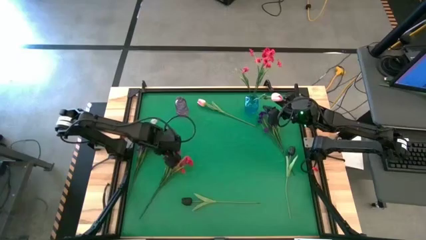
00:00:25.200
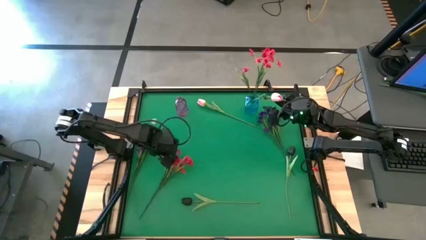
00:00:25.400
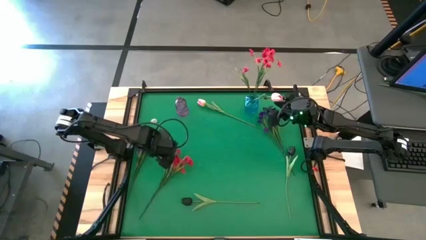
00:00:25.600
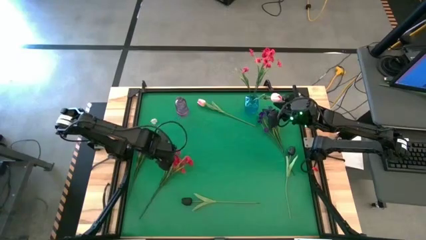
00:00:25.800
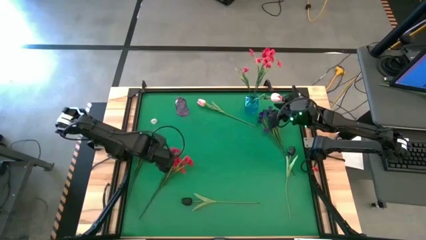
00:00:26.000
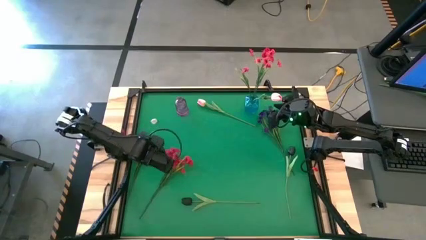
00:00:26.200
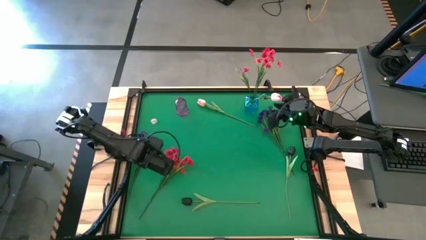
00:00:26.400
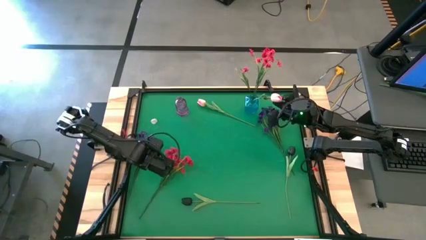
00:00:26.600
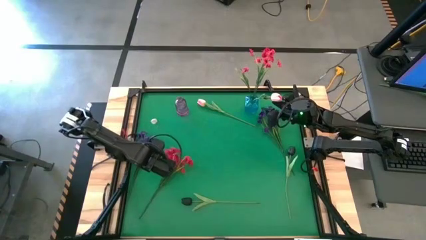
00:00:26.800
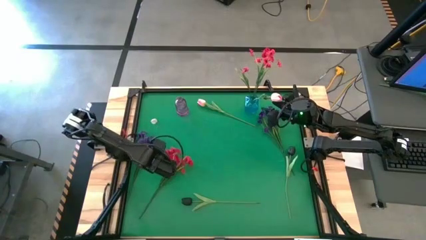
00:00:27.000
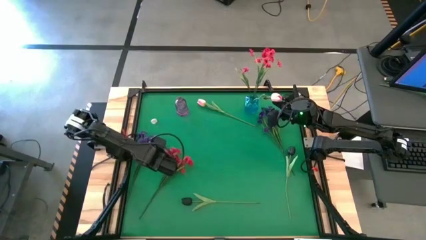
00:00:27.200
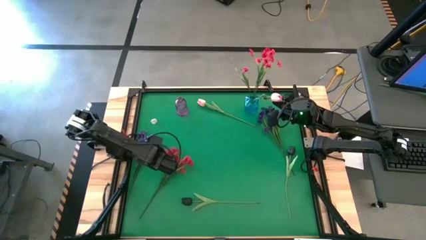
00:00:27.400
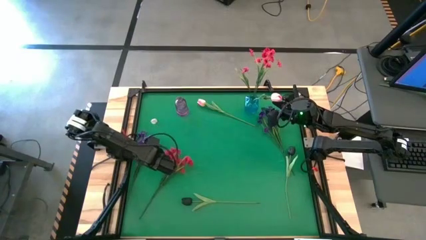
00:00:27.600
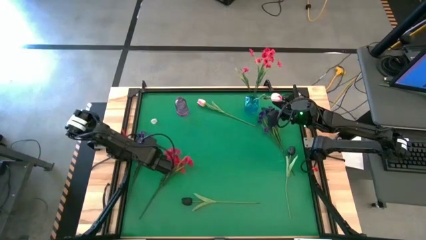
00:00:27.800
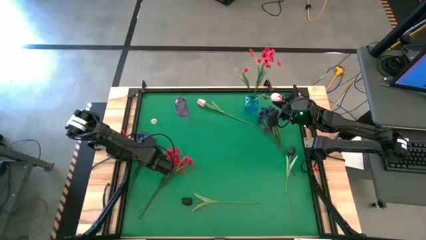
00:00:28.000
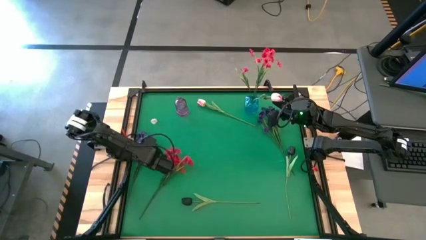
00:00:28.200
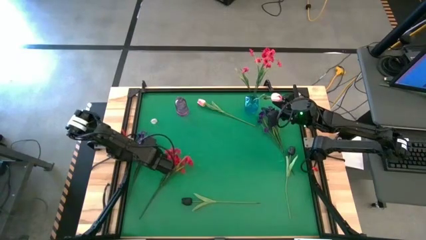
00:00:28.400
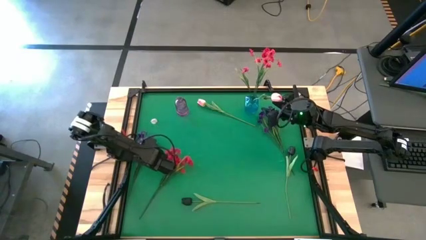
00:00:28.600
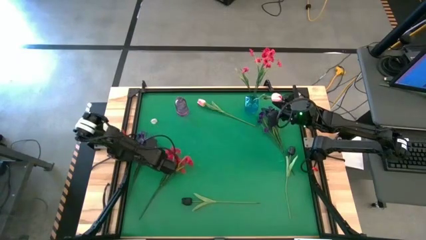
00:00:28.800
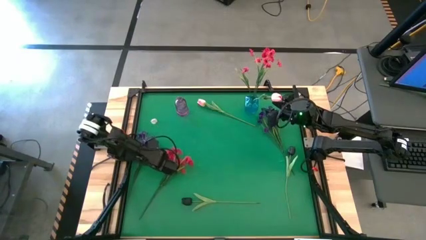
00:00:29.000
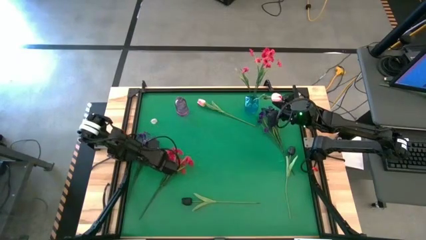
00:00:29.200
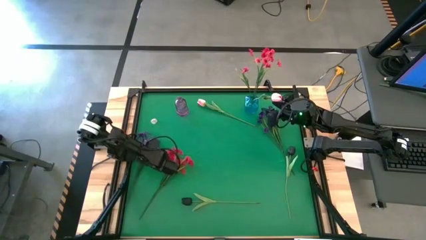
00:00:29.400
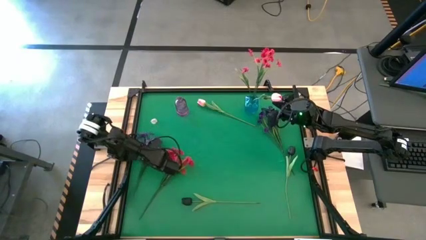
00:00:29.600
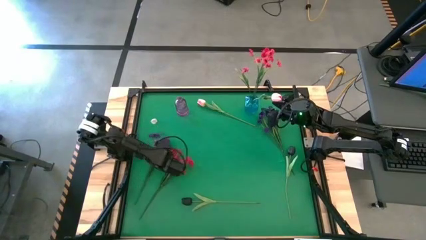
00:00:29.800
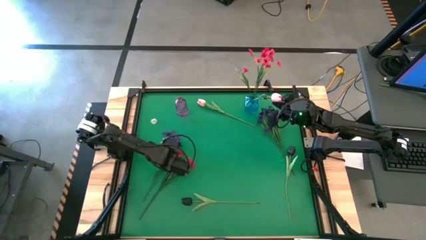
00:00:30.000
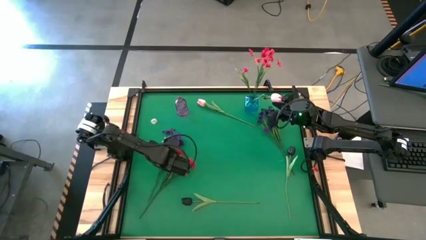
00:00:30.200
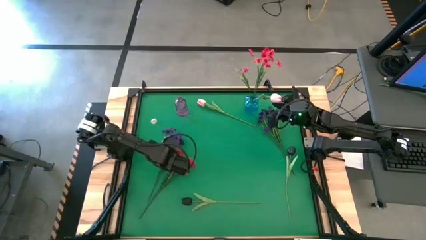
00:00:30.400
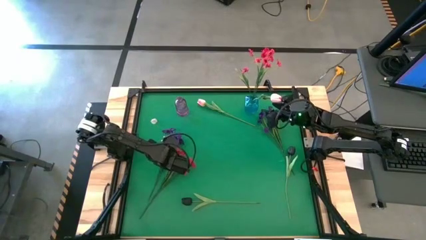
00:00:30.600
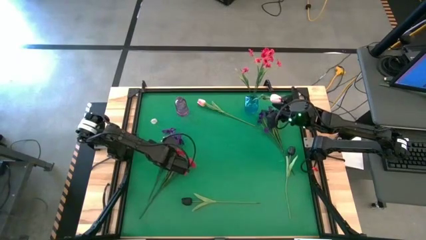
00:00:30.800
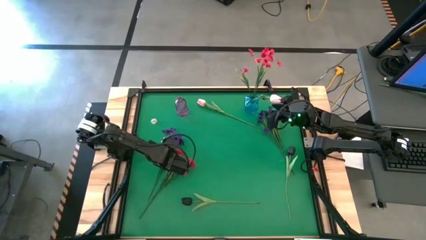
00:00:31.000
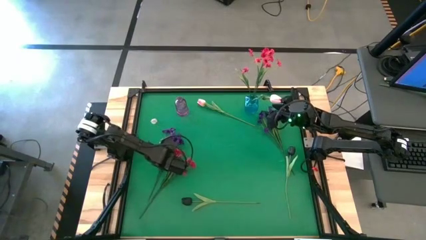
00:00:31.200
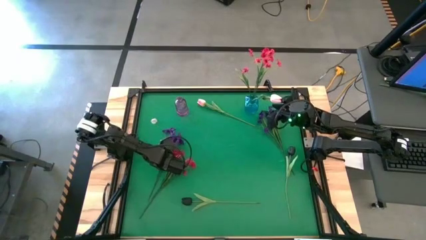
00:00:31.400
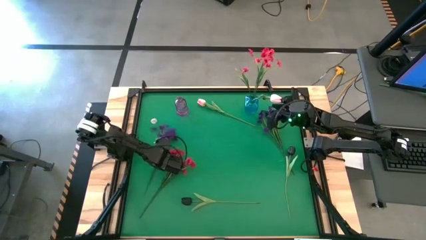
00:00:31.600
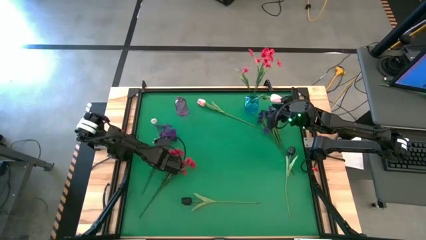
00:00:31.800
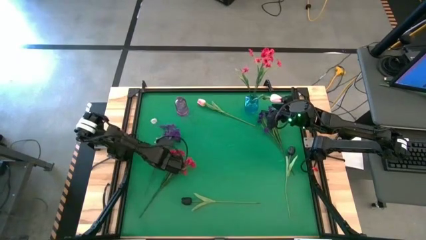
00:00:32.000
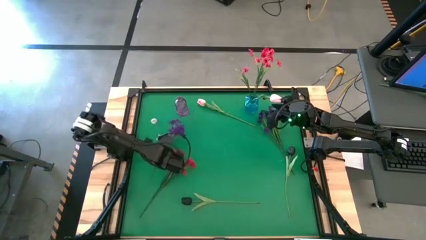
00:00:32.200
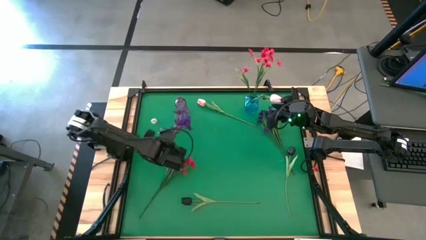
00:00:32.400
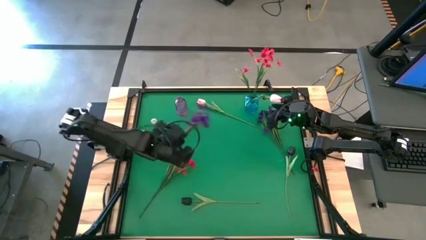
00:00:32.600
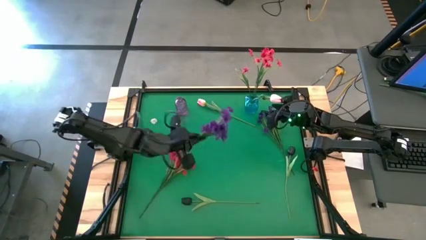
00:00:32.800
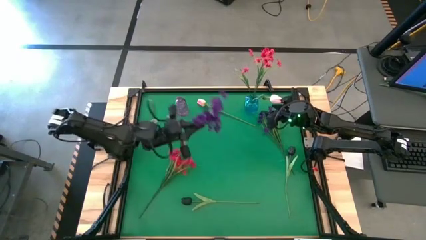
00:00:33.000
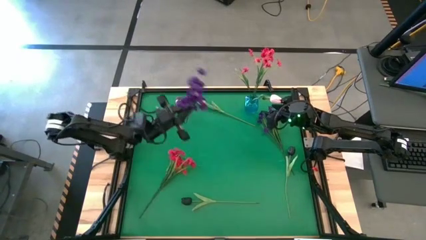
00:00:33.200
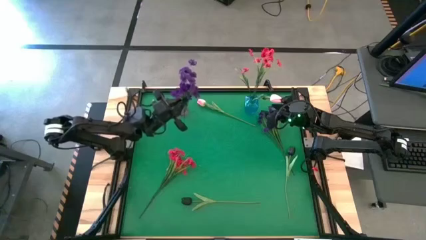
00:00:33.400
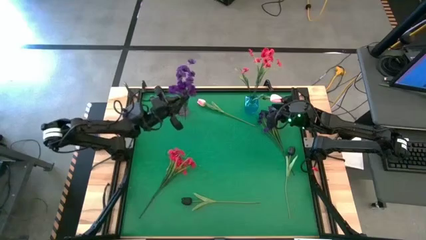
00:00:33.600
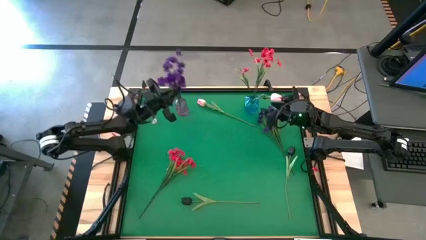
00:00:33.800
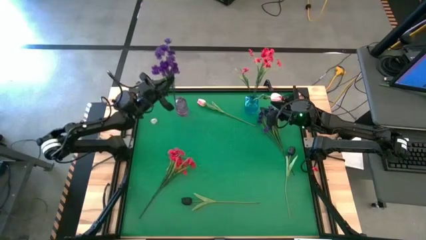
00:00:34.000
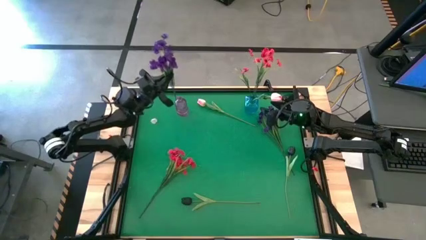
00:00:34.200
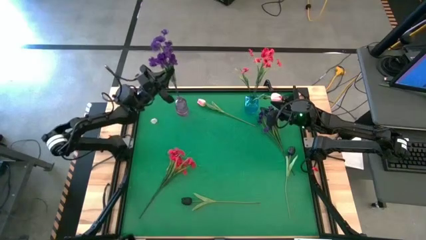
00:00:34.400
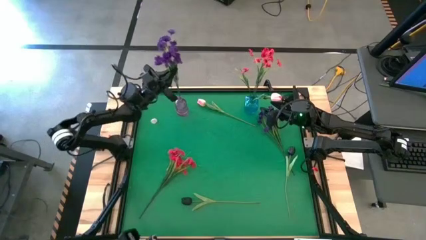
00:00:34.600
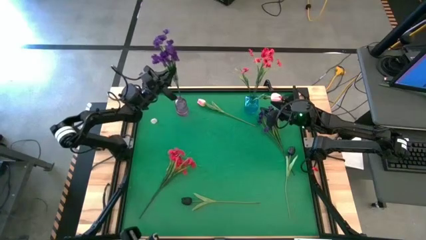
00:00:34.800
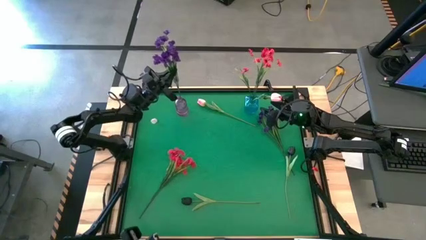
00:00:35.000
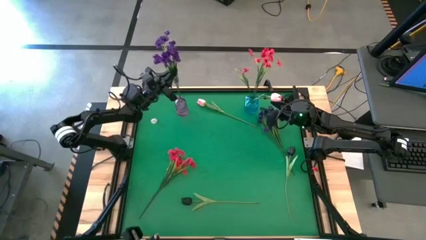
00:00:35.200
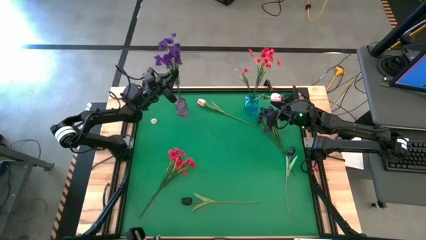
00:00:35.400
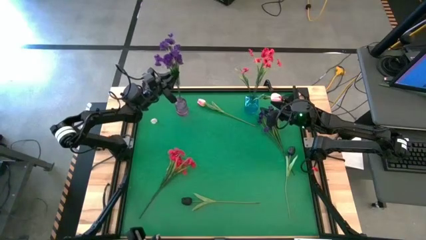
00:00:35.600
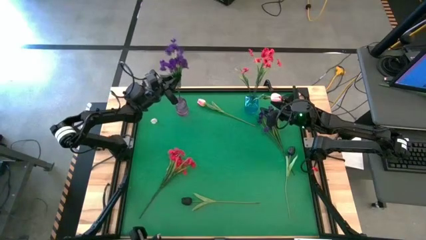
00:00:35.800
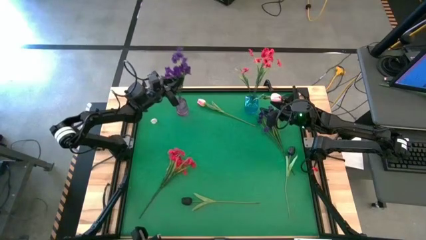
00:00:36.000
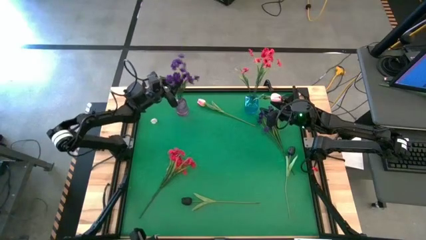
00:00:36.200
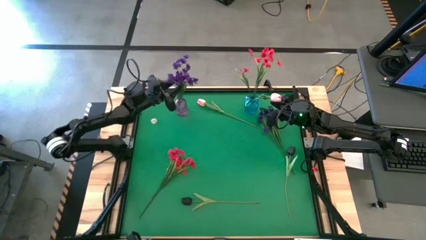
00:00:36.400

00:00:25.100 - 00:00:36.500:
Task: Sort flowers into vase by color
Put the left violet flowers into the violet vase

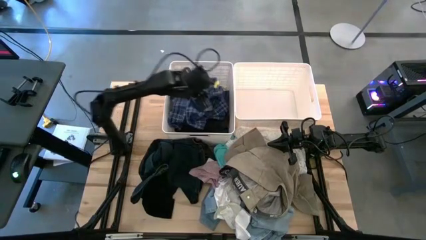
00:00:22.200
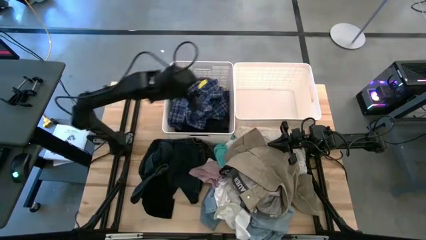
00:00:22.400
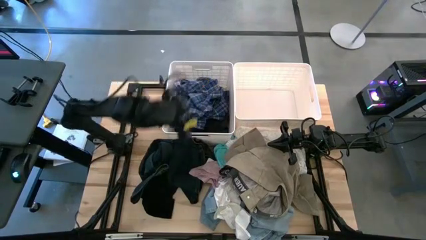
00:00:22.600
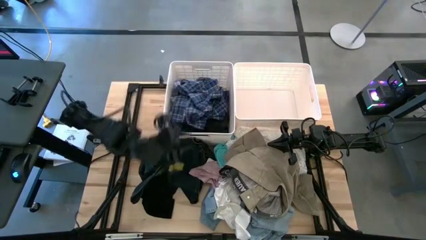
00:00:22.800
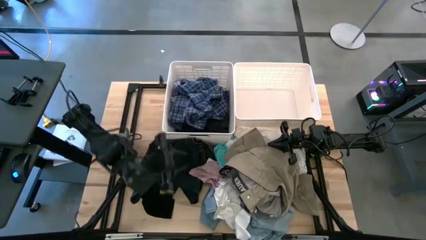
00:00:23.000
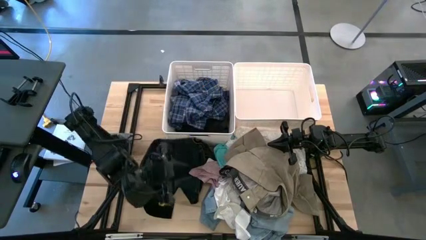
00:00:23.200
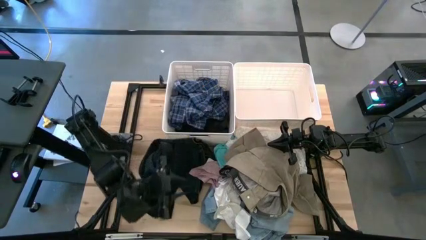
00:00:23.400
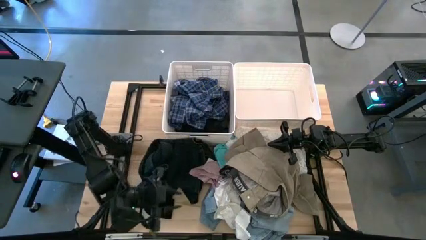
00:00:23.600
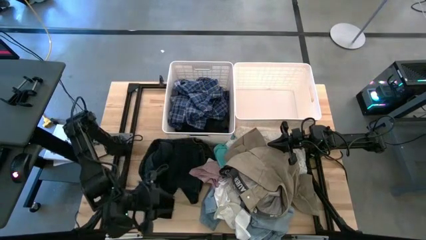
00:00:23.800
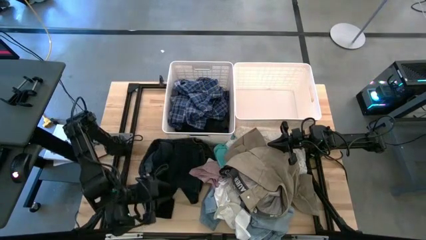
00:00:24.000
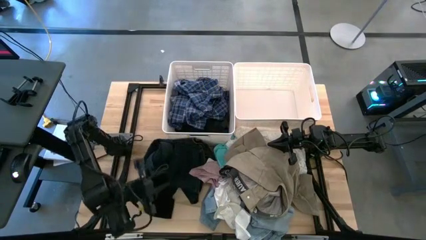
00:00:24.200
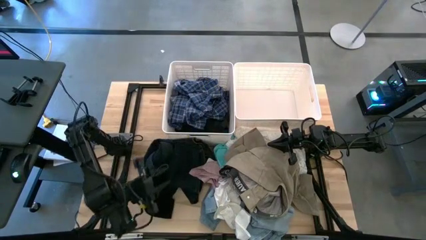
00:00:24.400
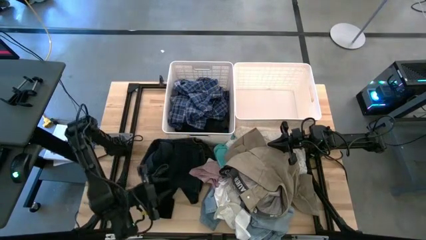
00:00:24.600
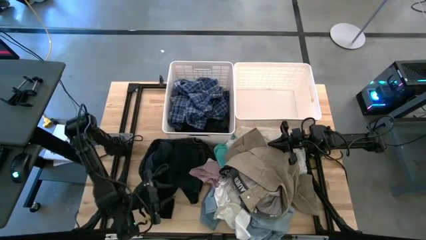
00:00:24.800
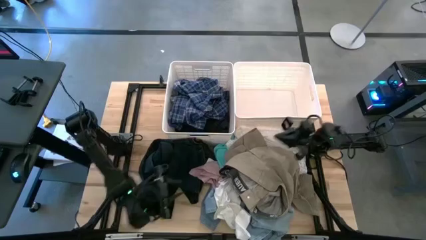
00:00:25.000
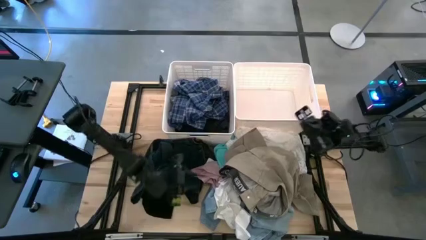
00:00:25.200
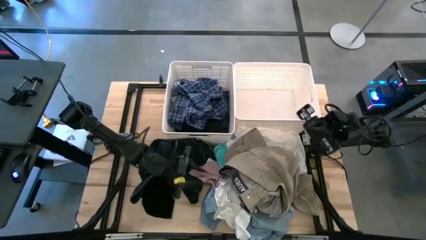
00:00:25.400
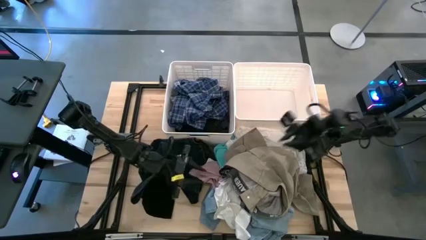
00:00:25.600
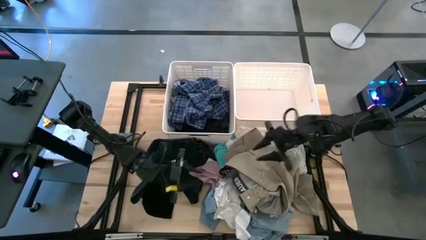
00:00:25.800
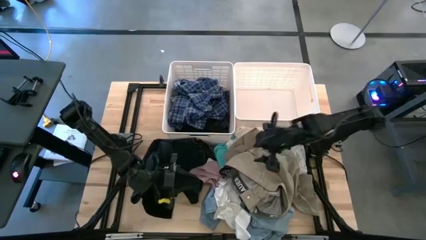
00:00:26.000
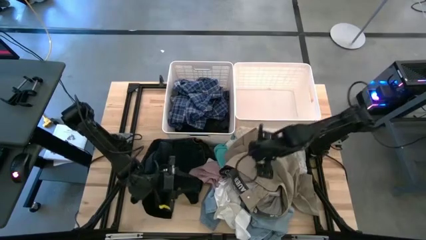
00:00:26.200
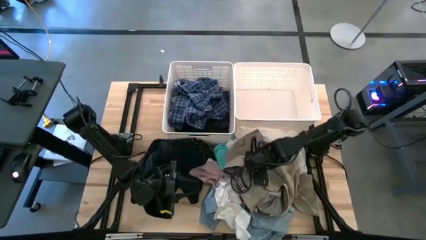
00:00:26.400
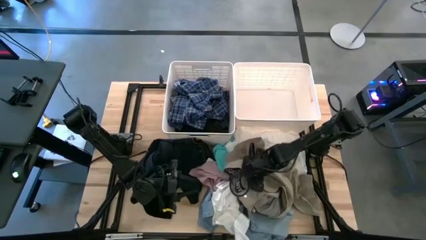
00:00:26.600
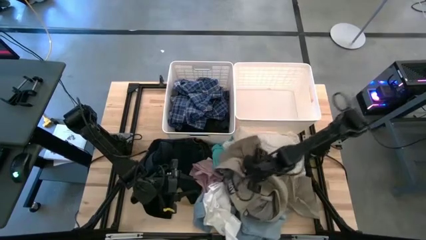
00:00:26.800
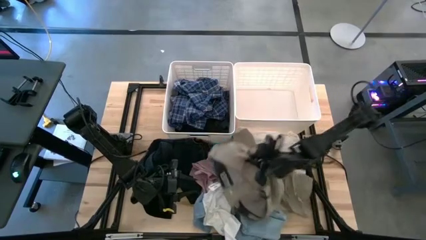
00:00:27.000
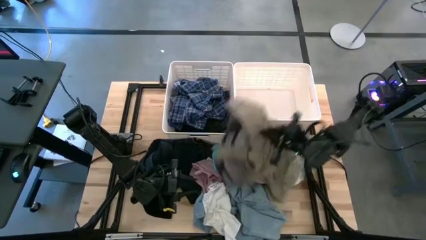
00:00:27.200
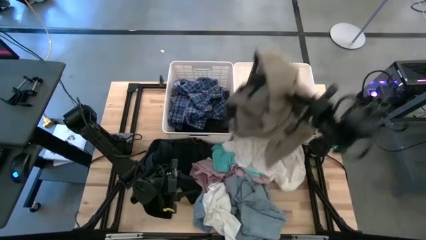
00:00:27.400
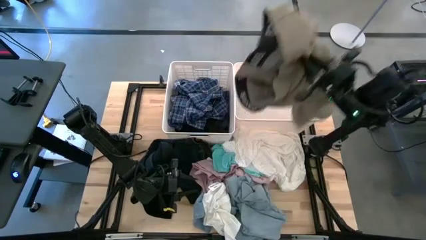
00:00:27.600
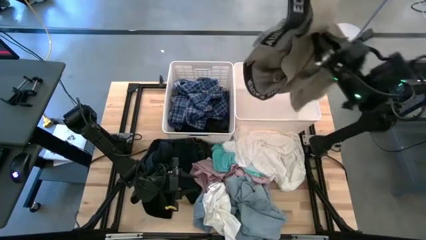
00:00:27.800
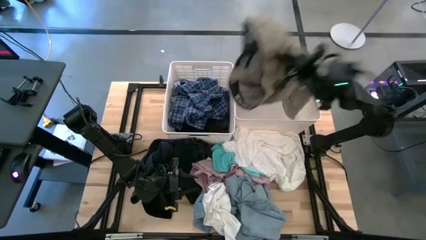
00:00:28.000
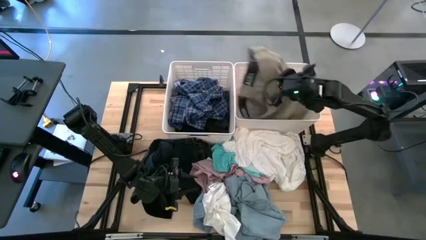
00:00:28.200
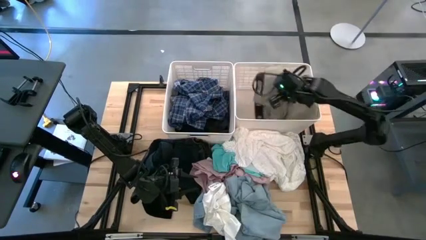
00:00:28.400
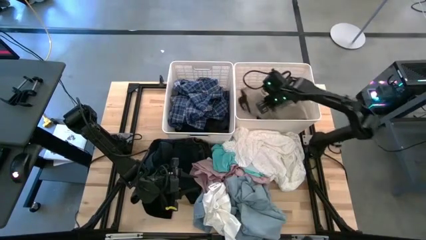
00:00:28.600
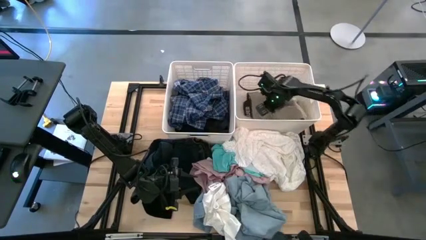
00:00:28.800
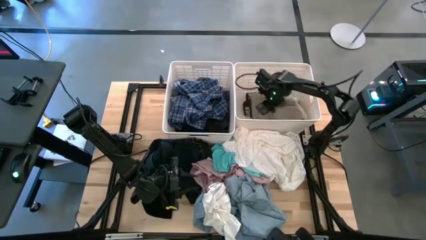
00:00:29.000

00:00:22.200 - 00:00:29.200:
Task: Sort clothes
Put the brown shorts into the right white bin
